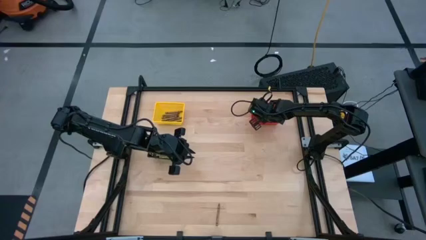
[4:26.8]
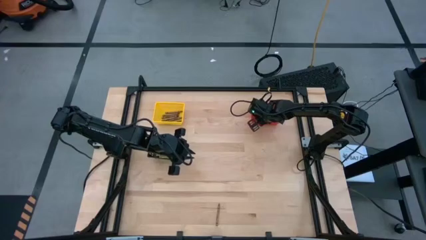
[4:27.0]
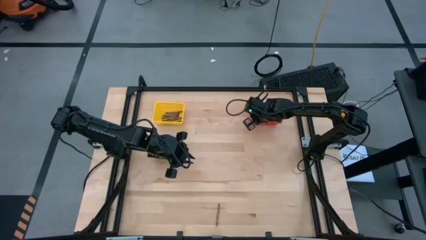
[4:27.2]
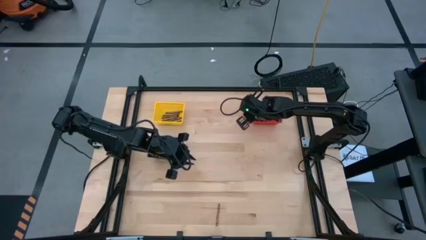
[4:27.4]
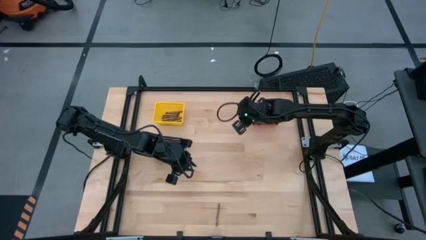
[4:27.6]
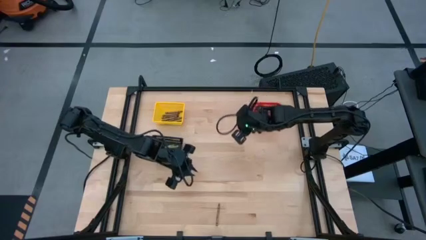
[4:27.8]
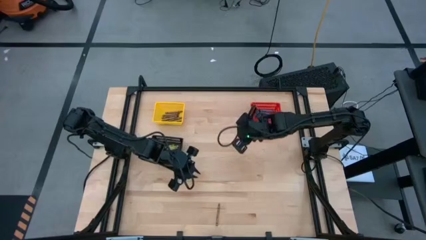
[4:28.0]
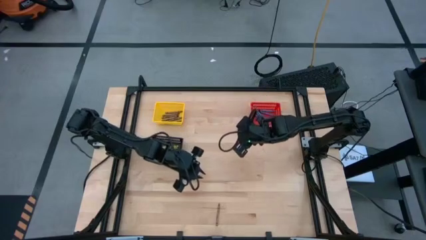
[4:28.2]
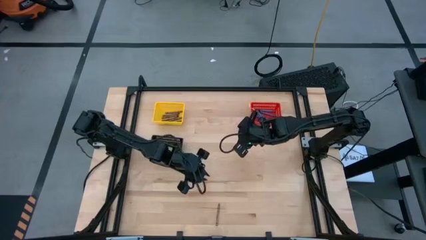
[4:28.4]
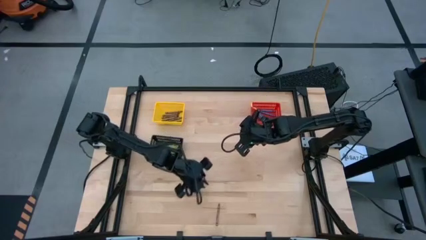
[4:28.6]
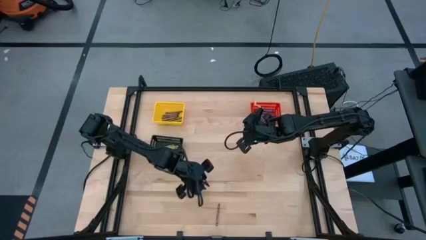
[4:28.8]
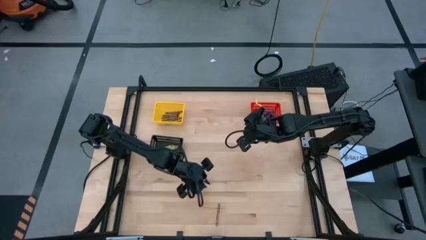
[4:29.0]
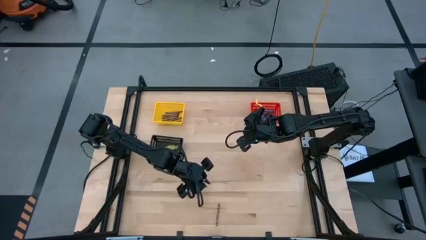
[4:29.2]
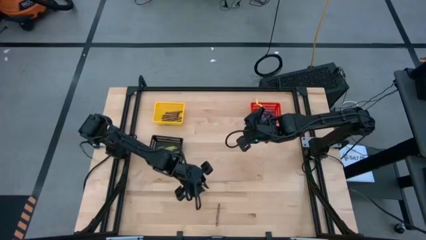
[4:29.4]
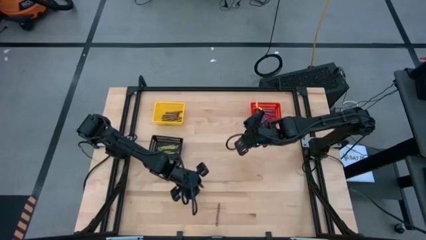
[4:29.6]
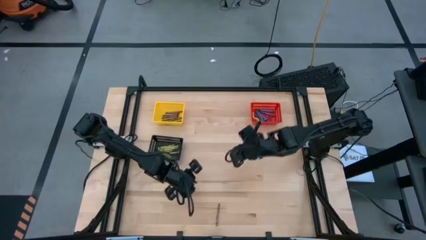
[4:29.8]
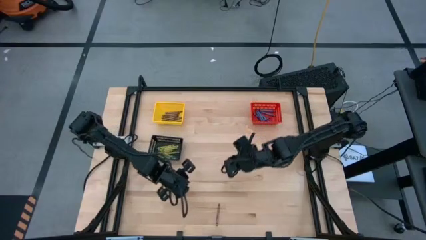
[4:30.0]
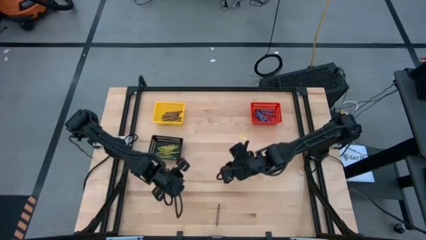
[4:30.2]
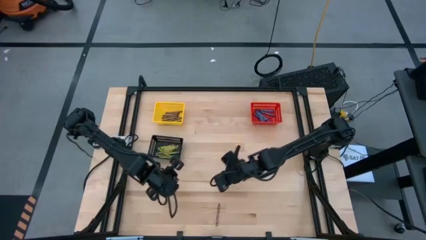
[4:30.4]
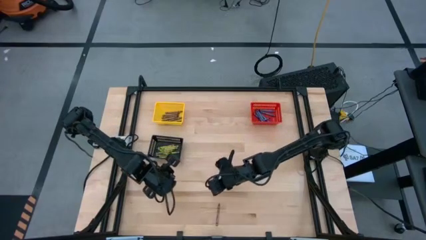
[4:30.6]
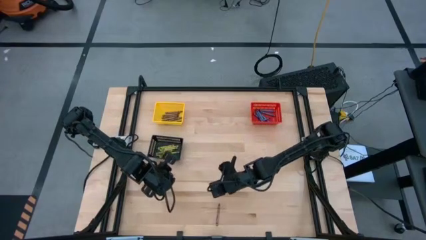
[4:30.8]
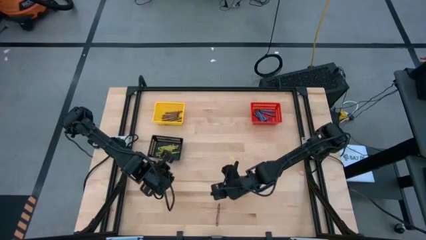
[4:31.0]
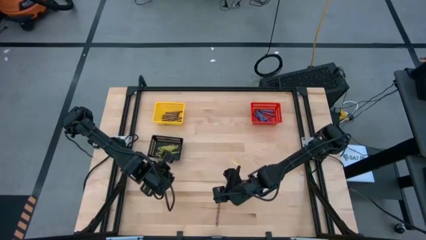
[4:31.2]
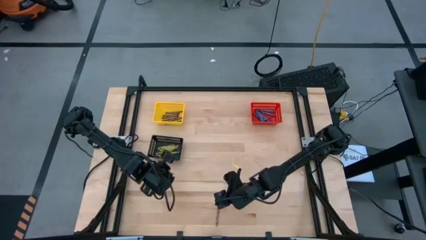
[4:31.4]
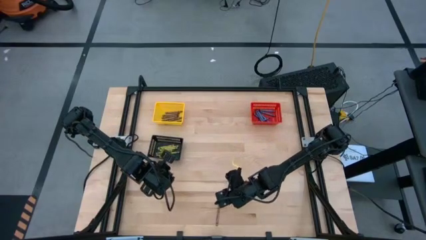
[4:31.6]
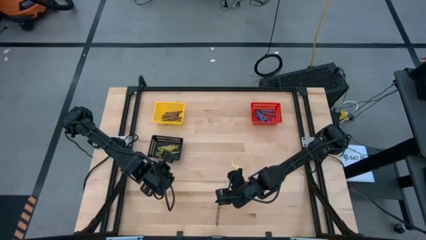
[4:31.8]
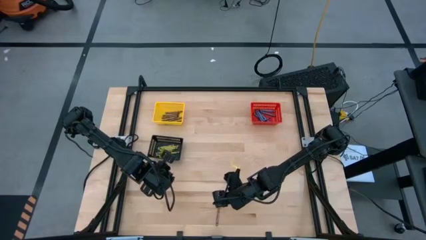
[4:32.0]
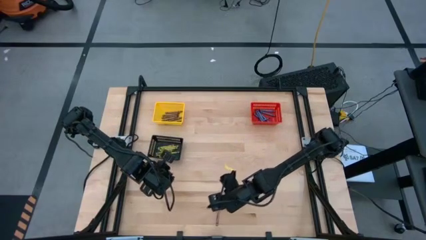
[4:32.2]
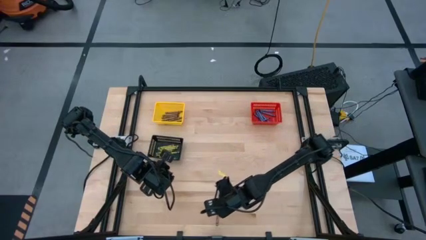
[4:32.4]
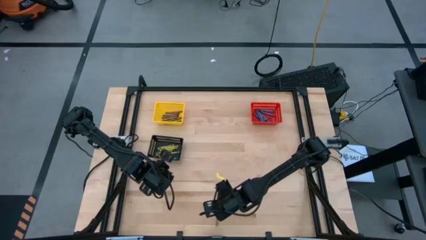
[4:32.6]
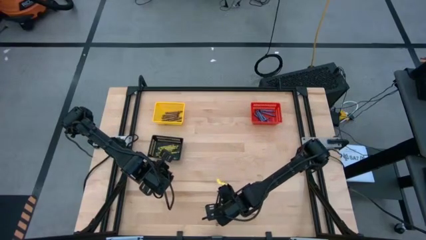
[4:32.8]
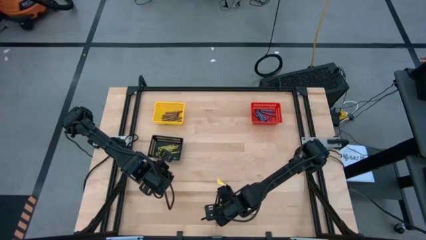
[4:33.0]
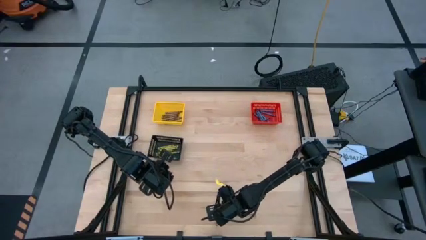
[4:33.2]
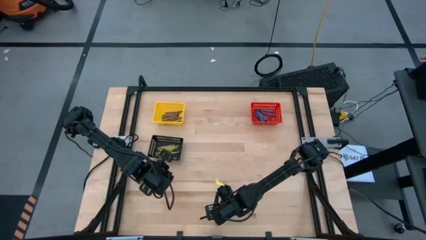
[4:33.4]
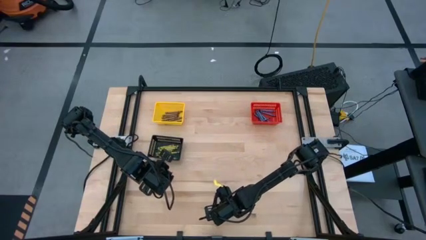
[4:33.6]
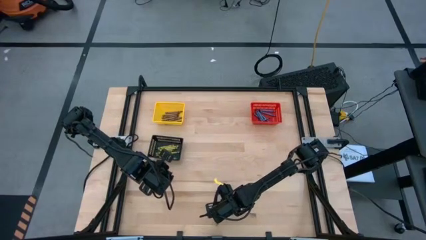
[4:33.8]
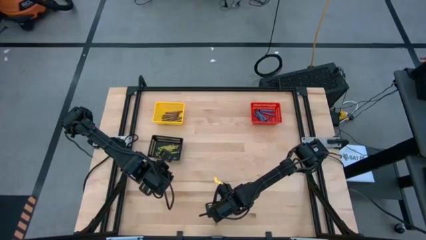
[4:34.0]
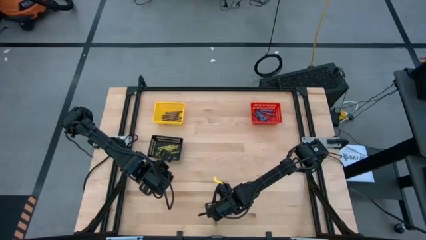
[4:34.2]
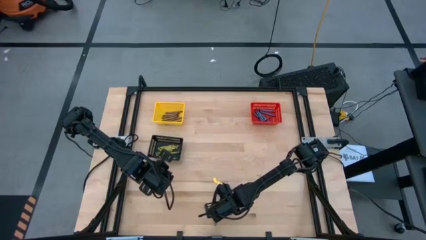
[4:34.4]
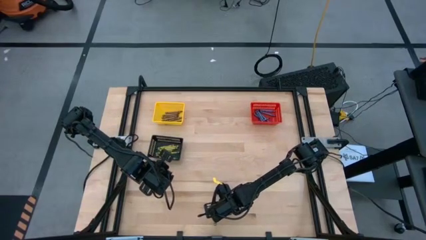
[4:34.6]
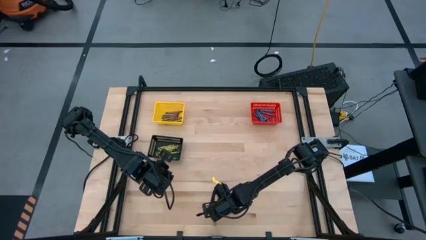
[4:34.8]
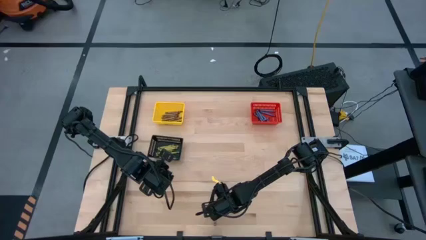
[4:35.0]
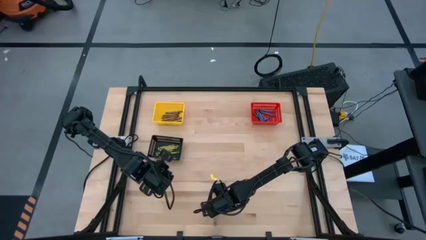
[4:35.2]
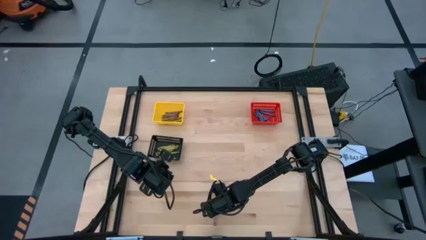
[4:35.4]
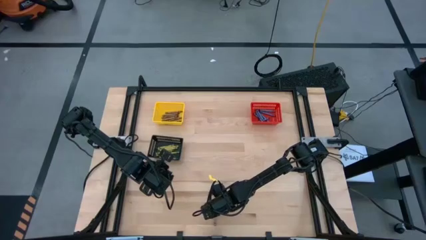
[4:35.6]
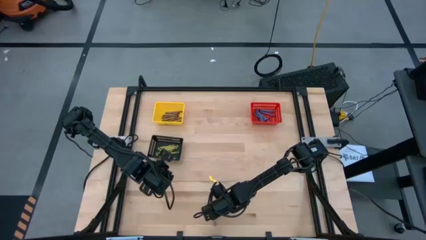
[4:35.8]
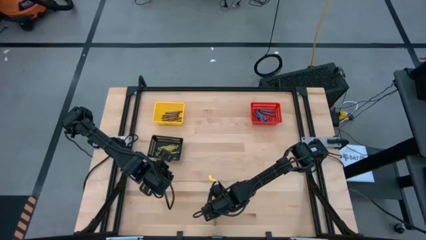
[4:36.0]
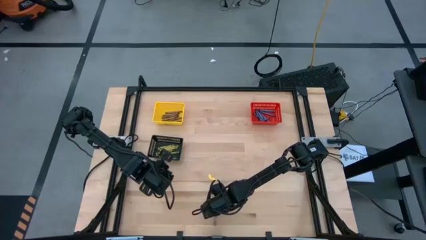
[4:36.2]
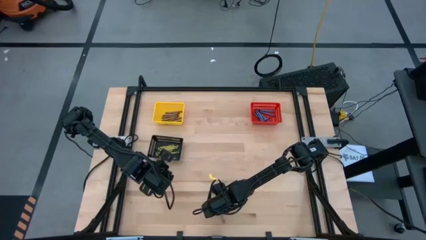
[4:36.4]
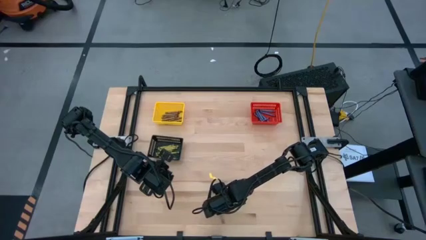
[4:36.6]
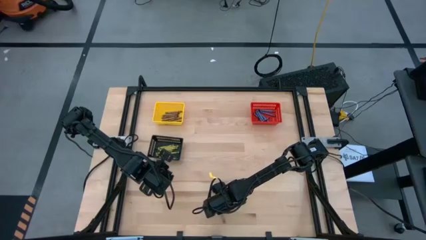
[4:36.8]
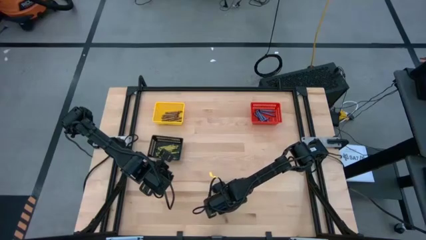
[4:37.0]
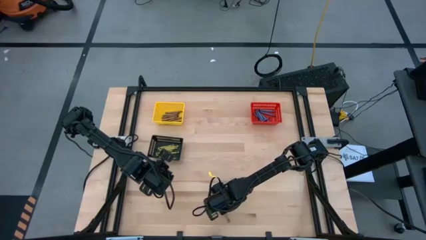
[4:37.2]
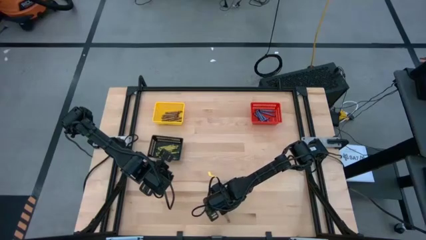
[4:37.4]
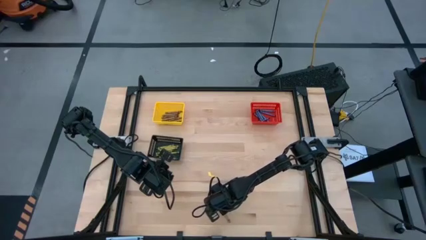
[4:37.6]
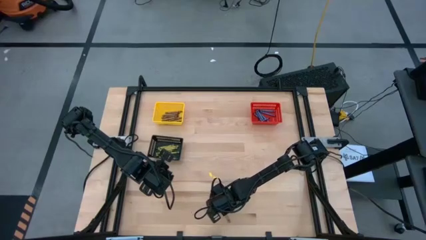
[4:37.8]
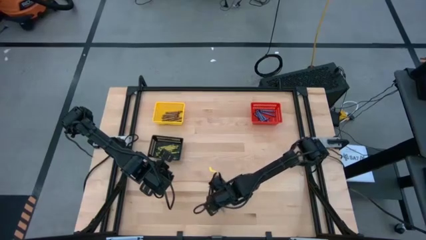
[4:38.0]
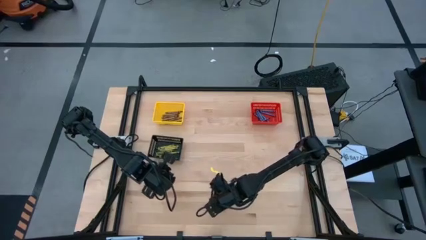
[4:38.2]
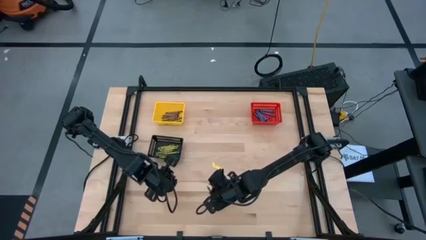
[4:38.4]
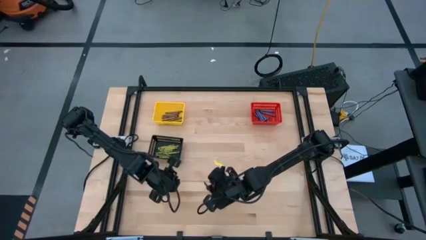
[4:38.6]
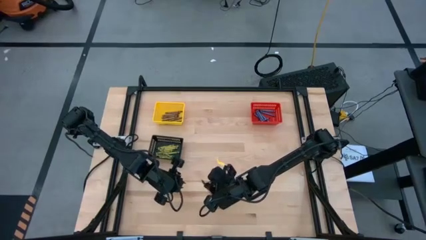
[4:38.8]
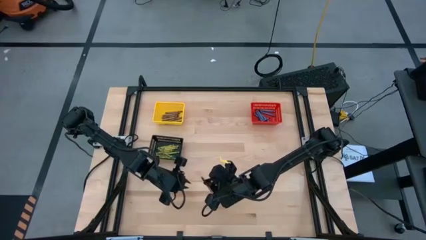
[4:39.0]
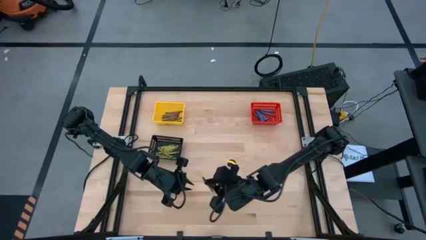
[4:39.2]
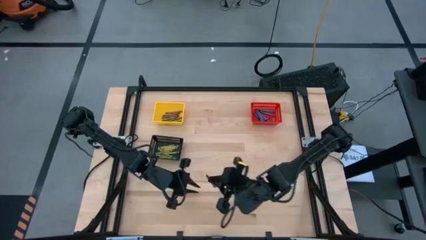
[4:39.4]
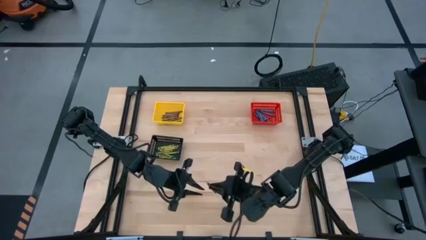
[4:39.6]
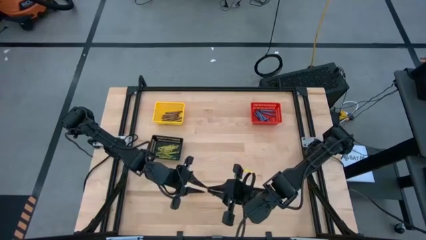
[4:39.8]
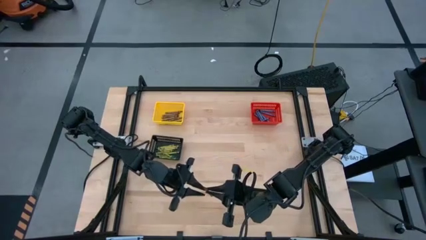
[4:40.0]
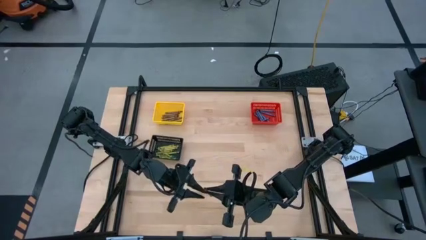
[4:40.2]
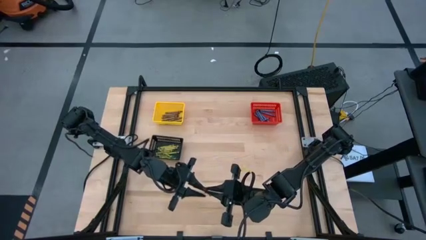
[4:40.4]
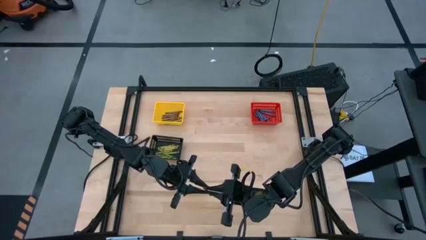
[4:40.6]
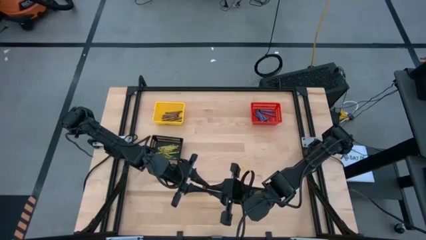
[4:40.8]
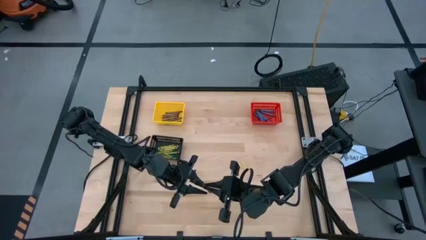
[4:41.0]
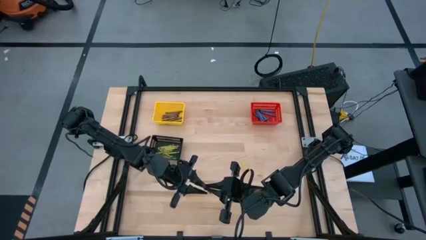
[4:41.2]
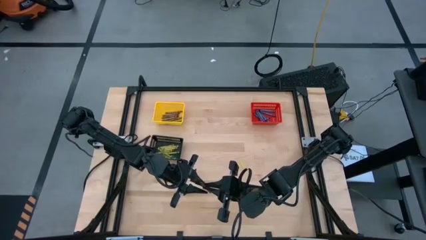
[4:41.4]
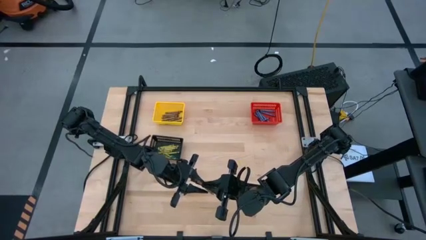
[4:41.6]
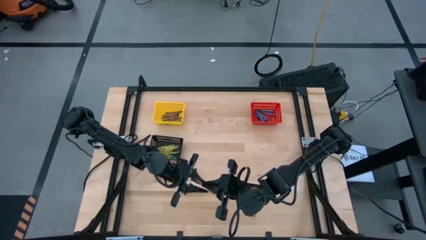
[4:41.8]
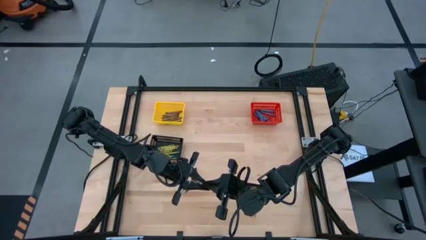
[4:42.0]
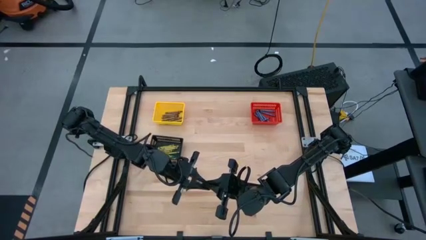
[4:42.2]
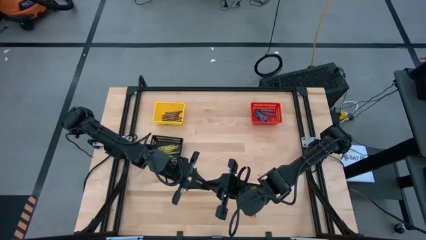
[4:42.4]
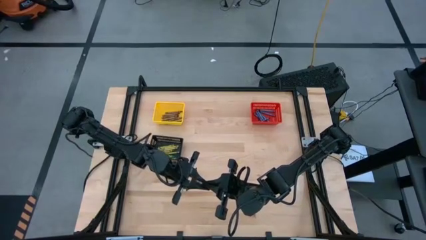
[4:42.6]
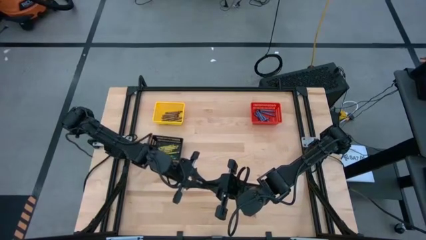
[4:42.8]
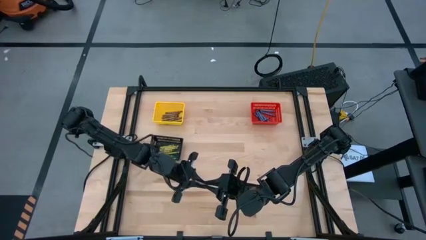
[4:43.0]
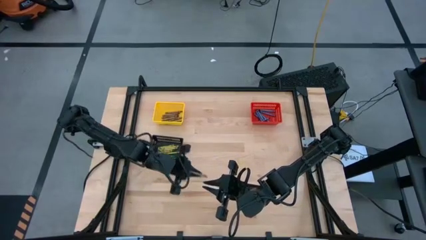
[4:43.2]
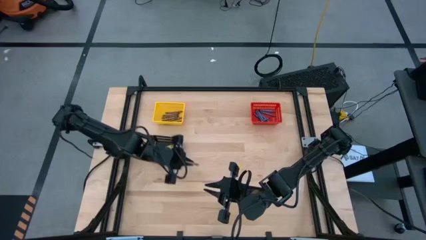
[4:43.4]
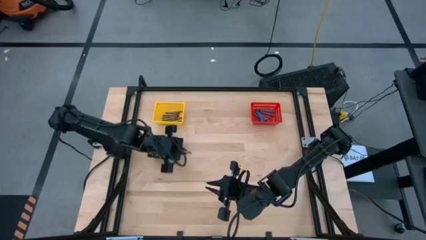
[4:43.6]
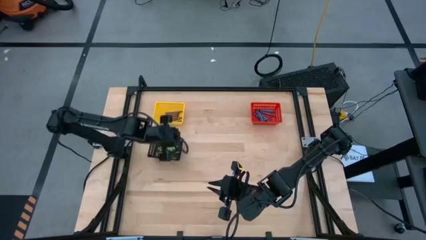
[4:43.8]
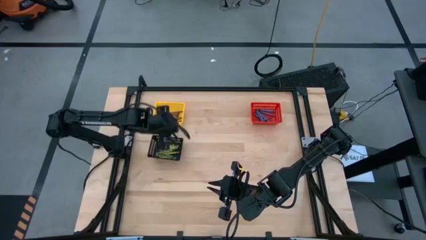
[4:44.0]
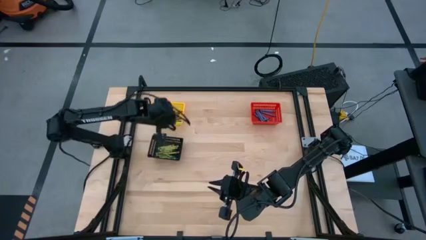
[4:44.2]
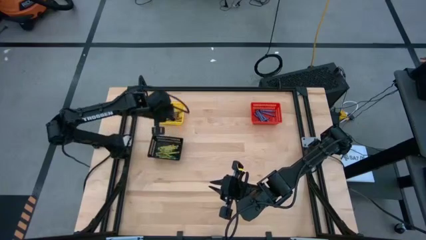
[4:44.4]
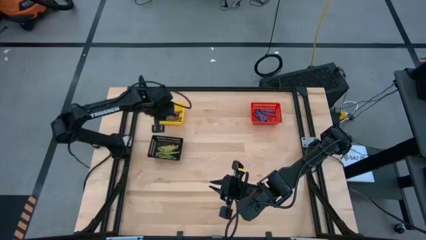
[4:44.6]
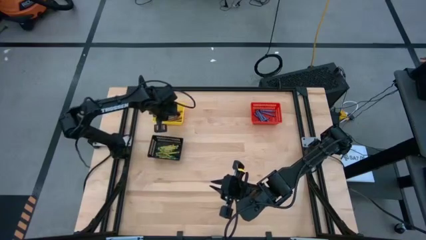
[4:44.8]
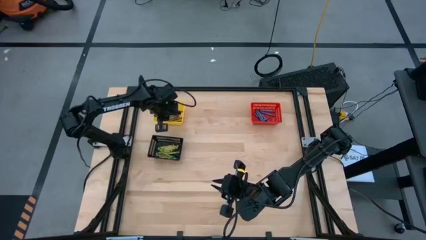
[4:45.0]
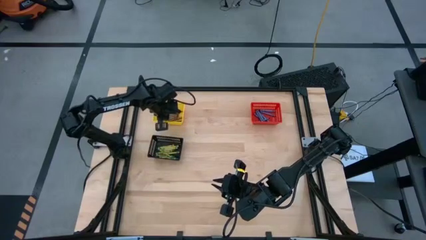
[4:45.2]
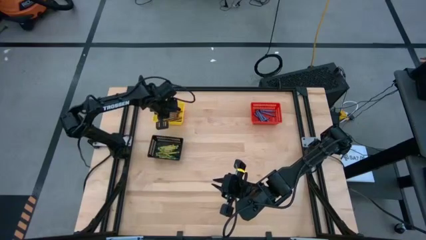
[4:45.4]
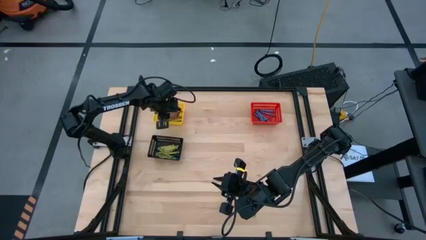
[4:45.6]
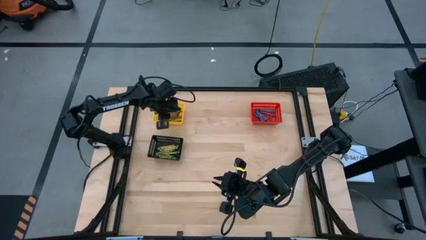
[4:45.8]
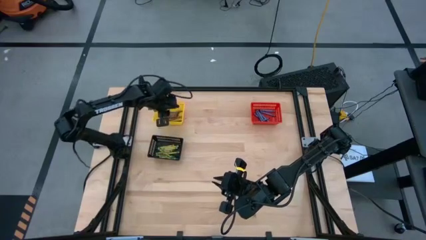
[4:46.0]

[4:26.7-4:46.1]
Task: Sort crayons
Put the brown crayon into the yellow bin
